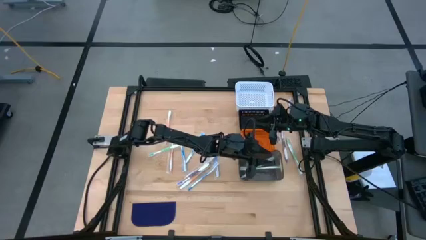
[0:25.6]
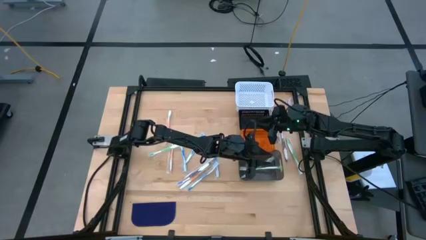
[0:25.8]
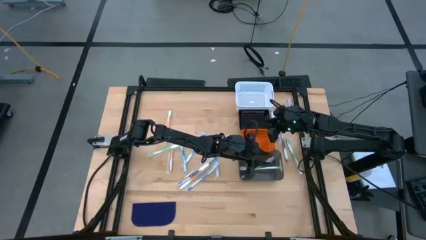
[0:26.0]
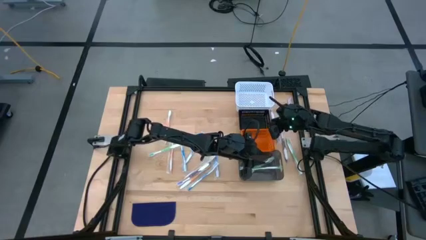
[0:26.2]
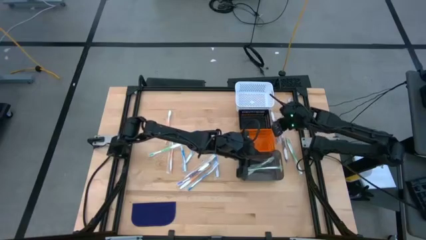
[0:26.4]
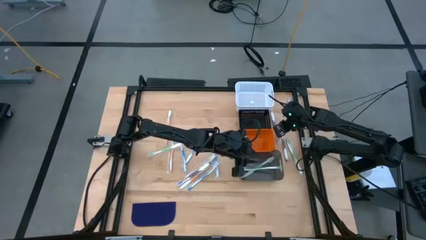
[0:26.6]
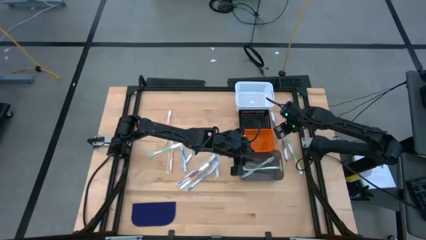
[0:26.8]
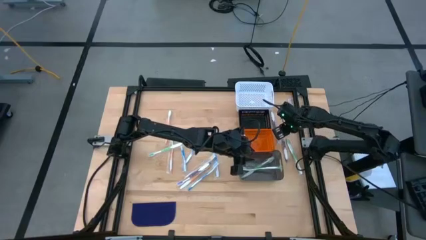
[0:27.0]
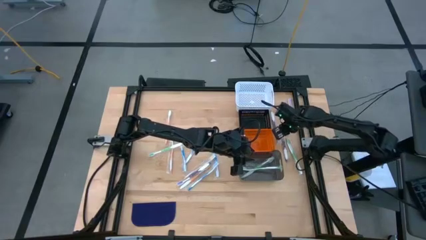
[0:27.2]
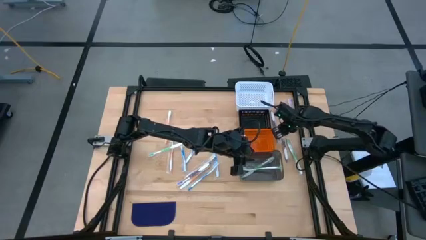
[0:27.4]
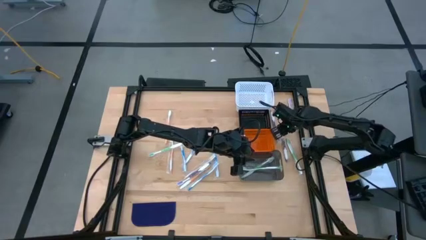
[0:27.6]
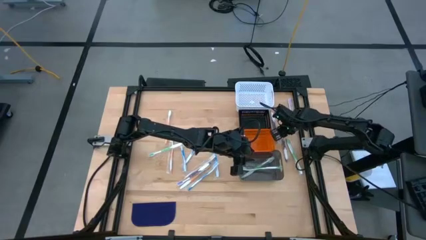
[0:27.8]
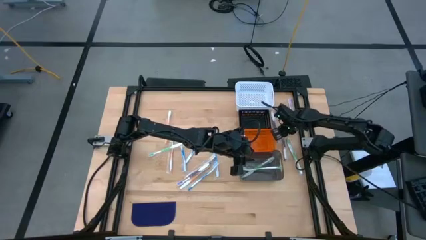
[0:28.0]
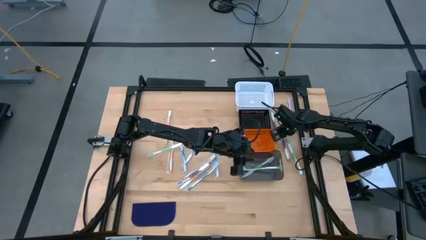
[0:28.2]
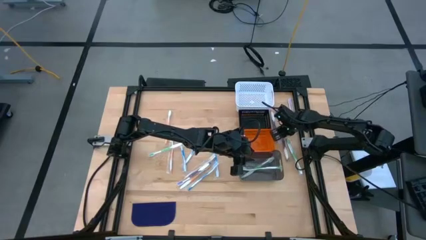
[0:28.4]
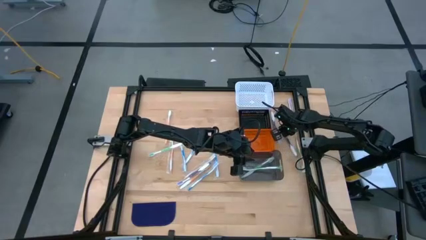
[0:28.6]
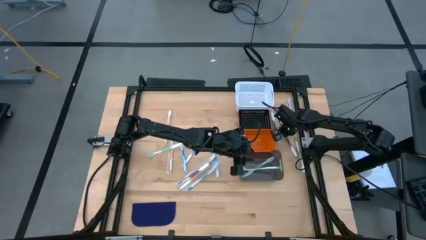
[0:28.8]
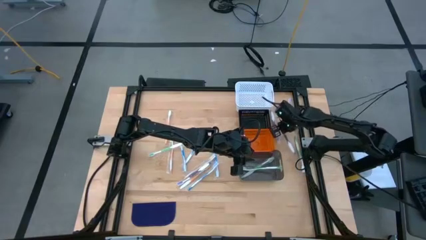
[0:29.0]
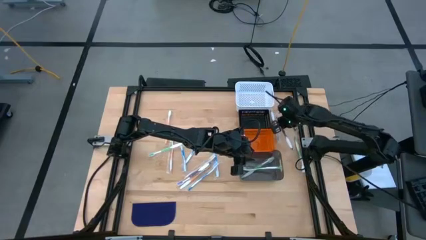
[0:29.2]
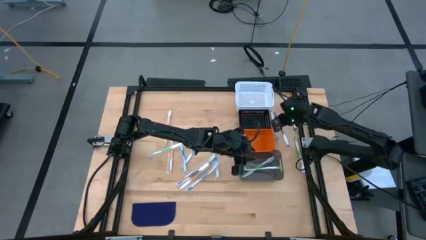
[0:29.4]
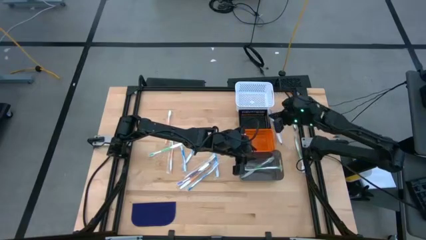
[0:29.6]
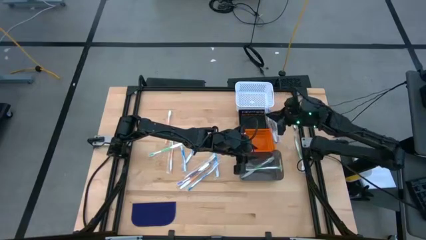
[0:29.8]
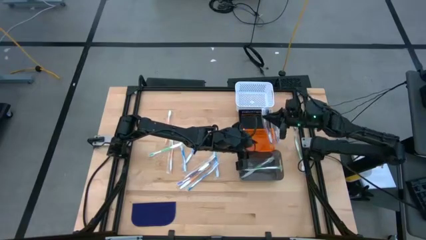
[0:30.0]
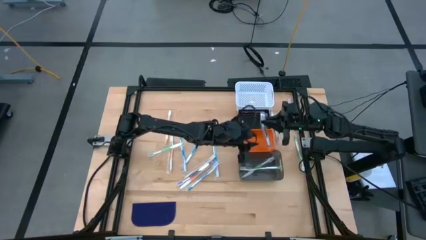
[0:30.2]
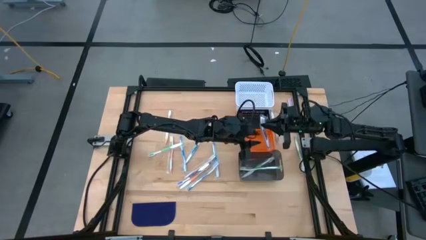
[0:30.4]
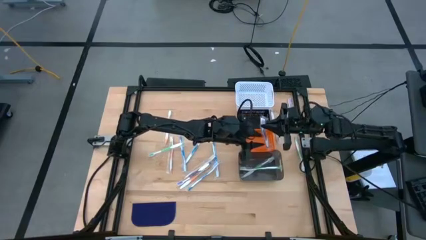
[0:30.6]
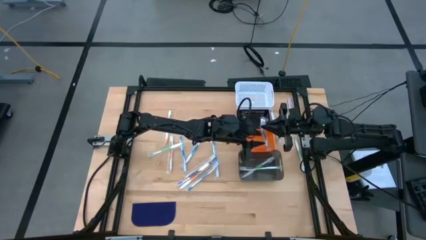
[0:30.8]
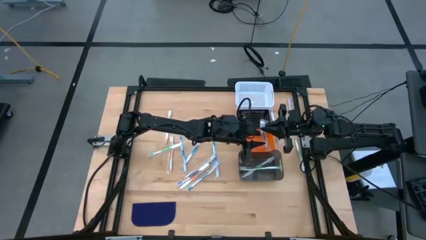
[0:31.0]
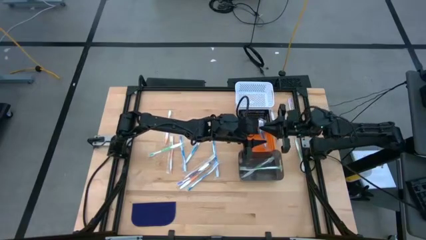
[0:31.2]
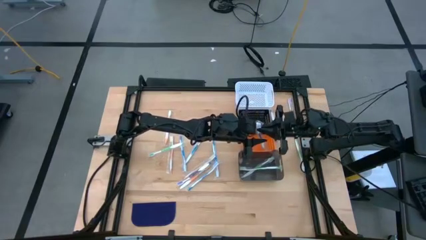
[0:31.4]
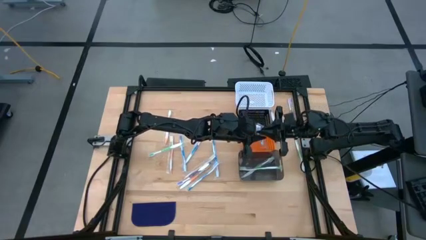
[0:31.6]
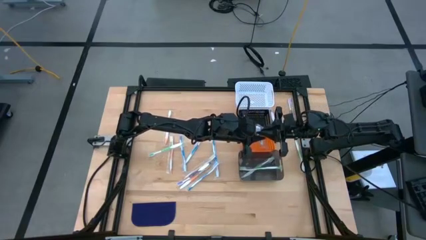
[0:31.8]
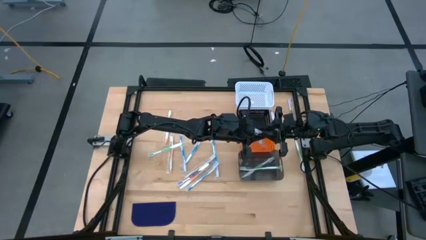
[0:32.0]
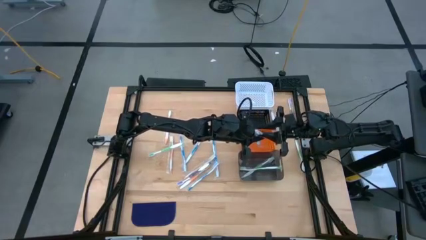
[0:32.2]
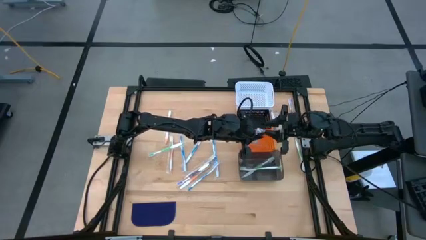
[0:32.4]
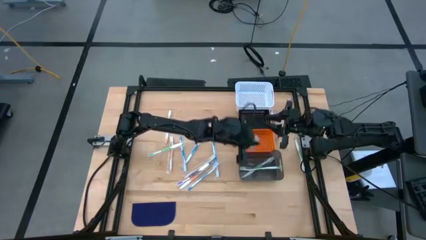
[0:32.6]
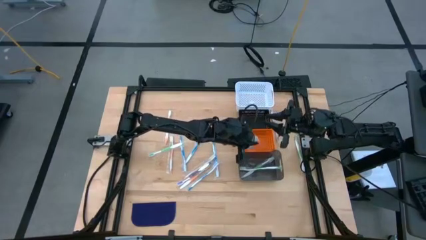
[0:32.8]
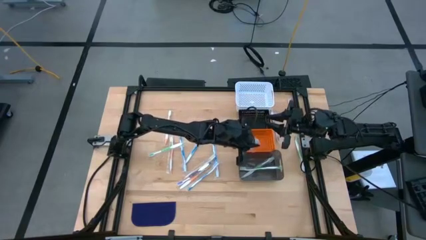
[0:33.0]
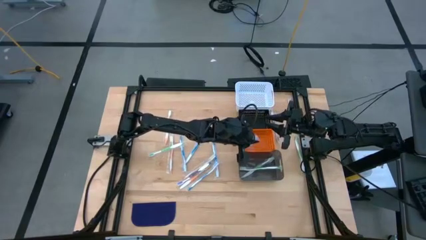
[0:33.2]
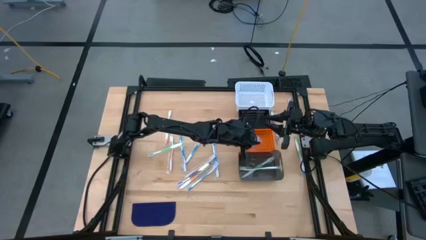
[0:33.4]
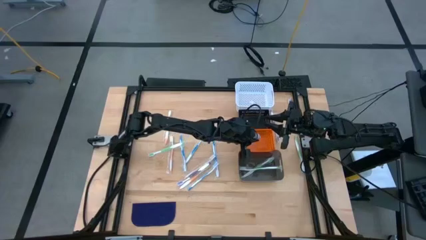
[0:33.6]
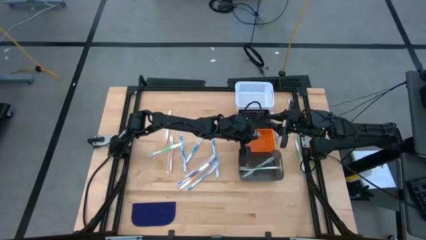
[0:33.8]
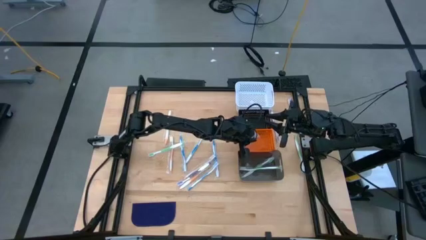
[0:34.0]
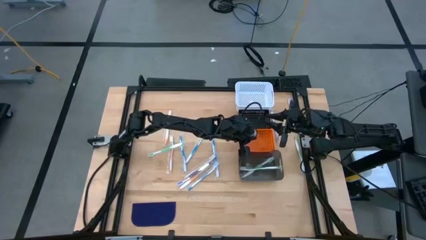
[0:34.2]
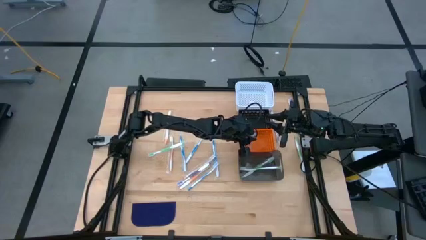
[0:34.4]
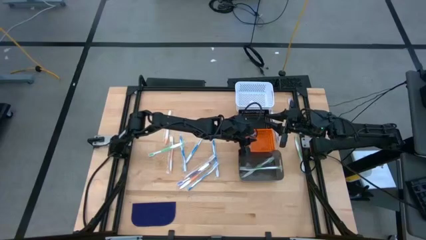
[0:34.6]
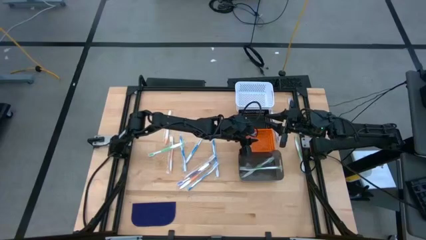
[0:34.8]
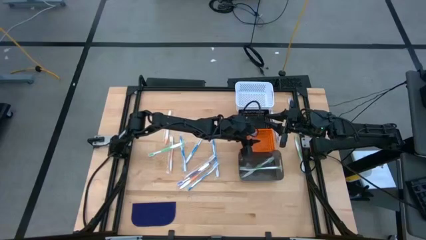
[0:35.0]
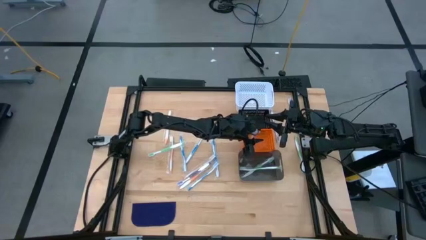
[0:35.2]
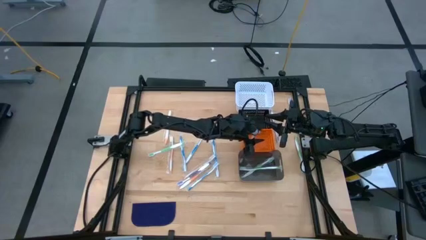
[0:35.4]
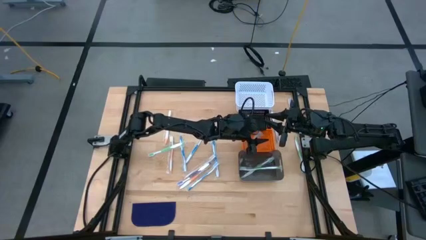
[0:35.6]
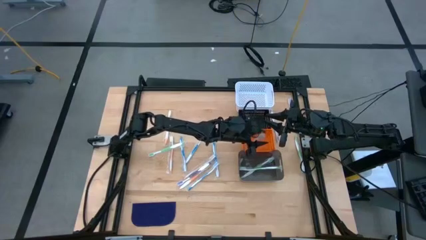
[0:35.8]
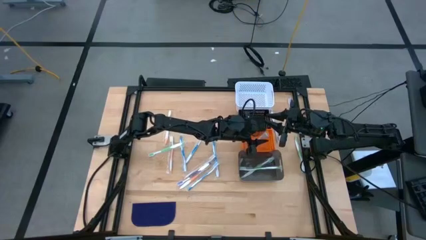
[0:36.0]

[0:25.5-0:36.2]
Task: Pick & Place Toothbrushes
Put the purple toothbrush into the orange bin

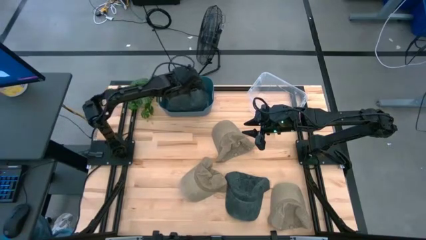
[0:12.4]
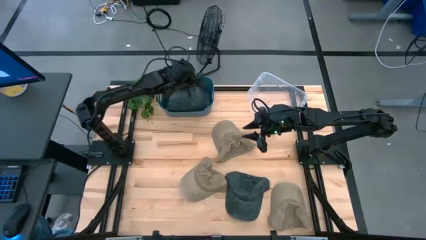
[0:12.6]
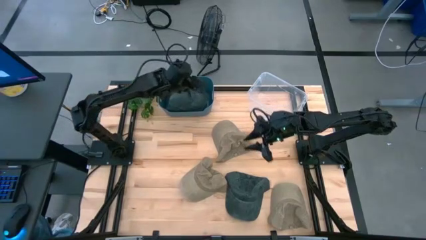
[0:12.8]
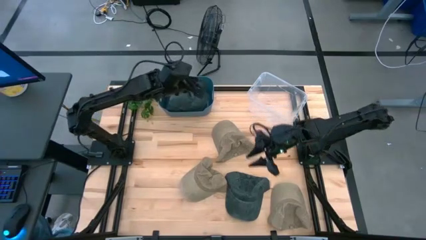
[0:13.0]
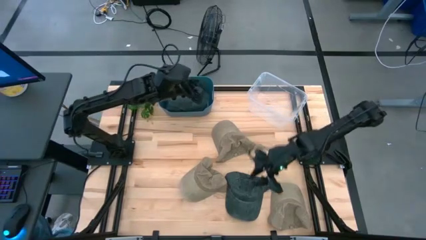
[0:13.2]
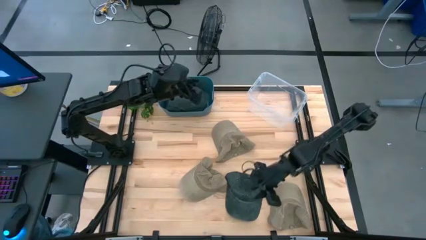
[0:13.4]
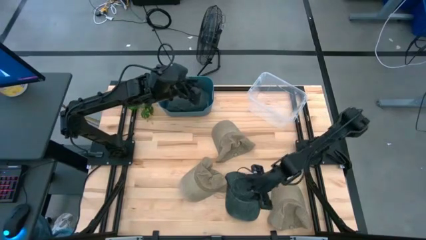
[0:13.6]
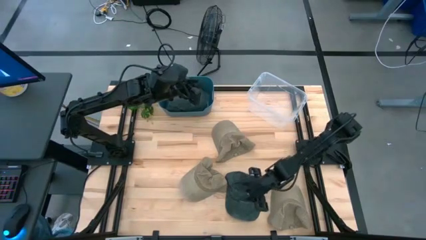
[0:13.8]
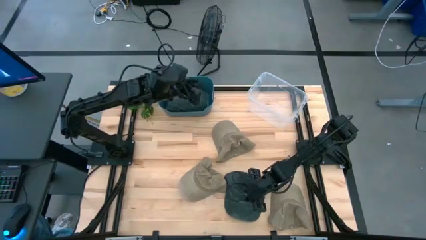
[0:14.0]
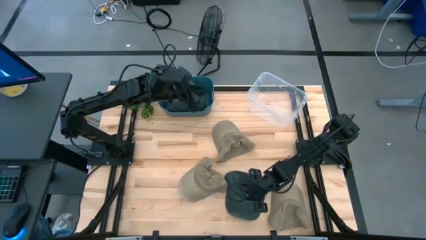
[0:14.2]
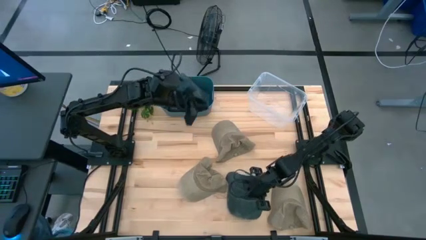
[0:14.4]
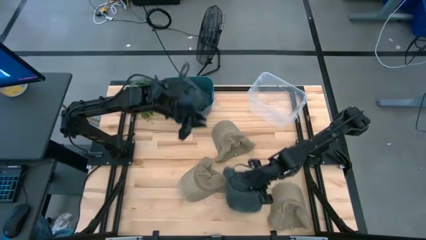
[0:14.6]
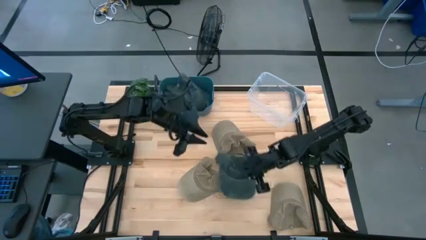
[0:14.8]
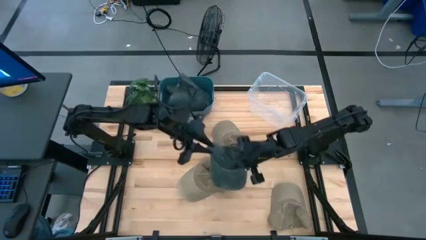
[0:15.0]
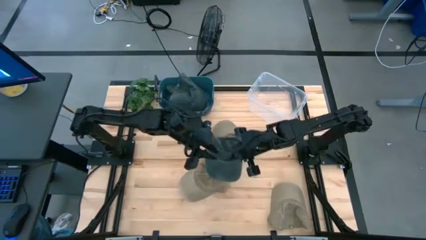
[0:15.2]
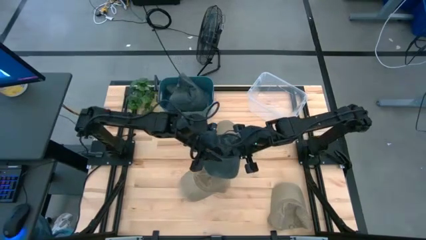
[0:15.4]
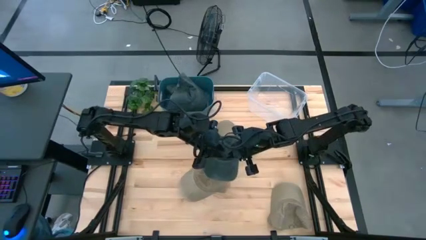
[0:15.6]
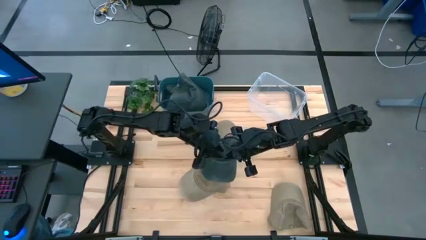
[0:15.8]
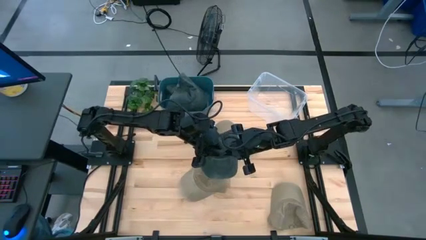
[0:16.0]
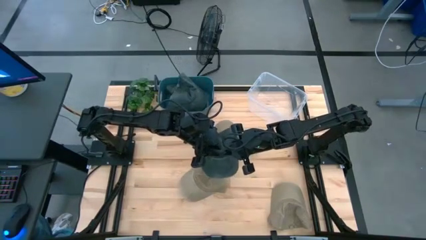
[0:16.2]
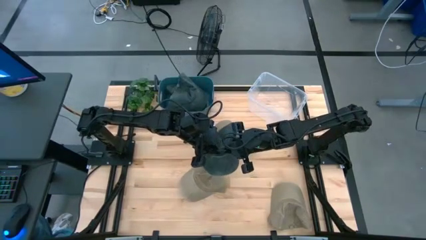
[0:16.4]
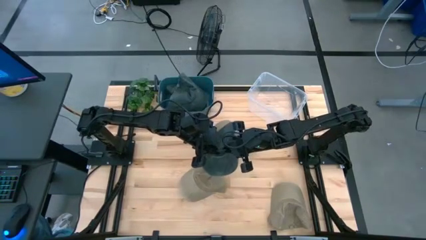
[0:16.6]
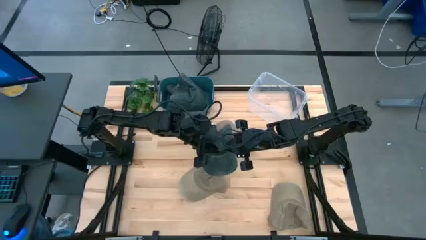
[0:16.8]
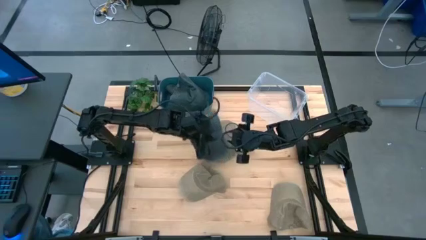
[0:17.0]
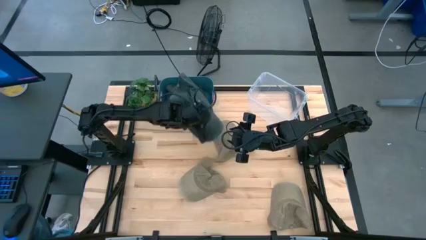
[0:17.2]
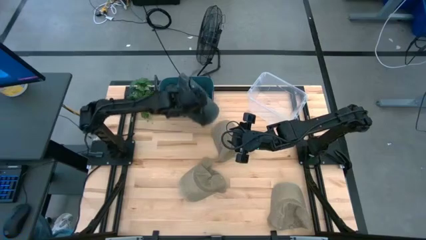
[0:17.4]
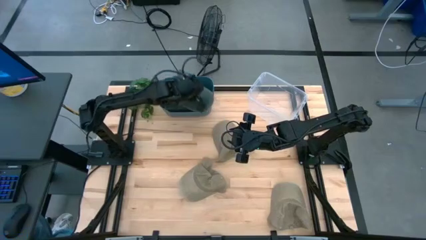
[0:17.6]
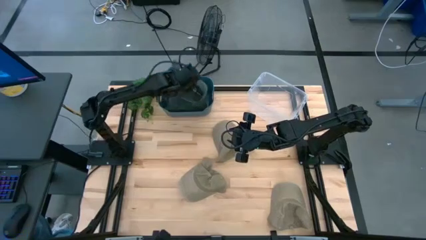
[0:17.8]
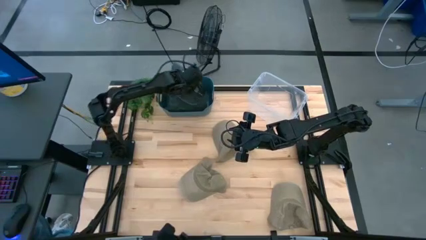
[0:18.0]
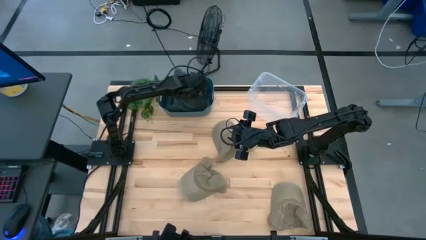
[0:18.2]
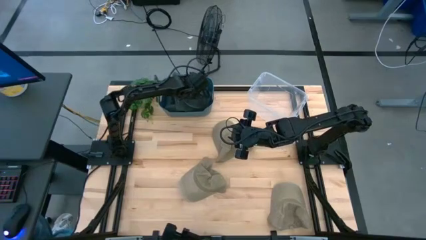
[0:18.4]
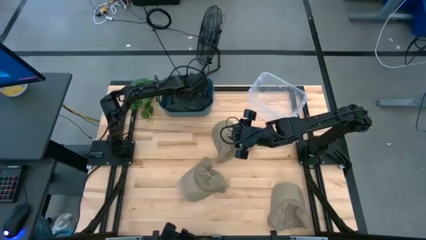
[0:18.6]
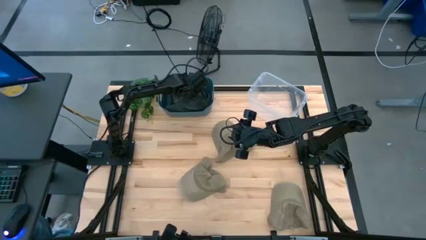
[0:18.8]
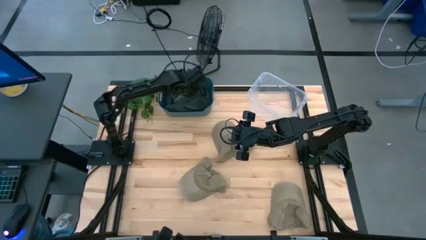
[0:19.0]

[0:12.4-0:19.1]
Task: Pick & Place hat
Put the blue cap into the blue bin
